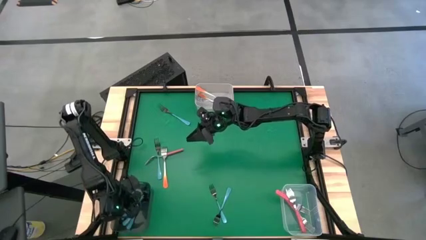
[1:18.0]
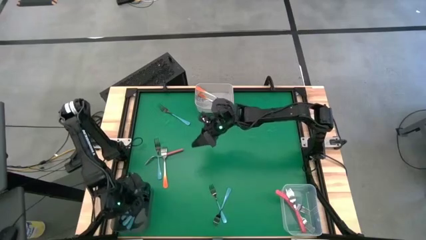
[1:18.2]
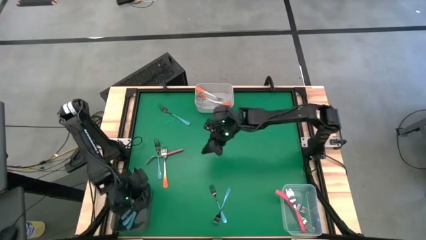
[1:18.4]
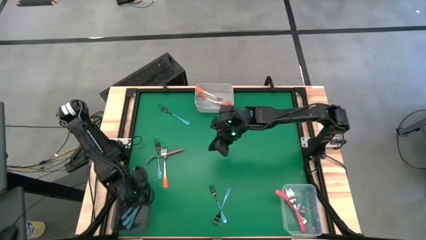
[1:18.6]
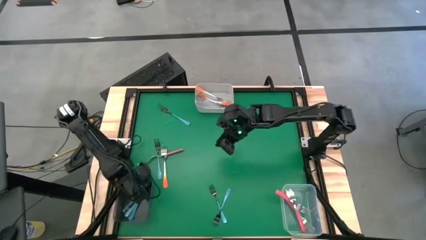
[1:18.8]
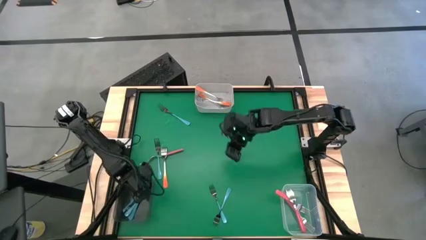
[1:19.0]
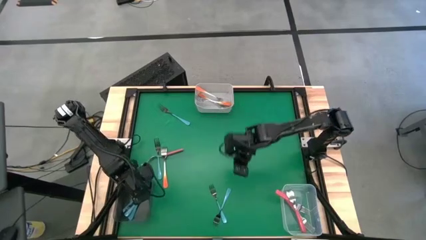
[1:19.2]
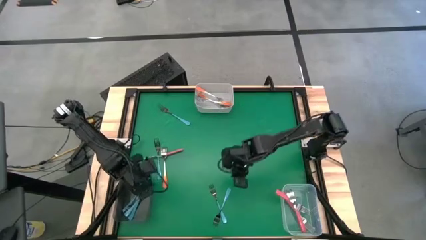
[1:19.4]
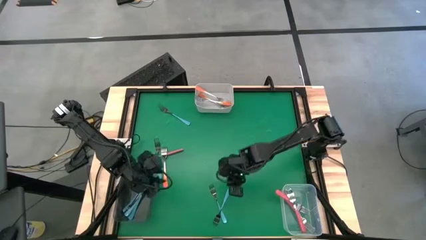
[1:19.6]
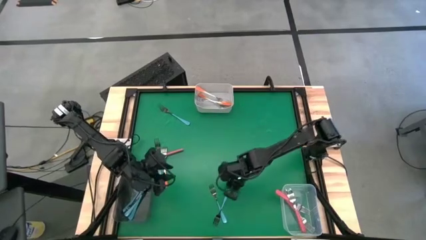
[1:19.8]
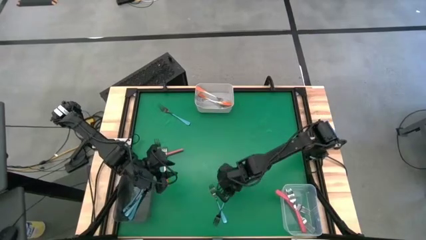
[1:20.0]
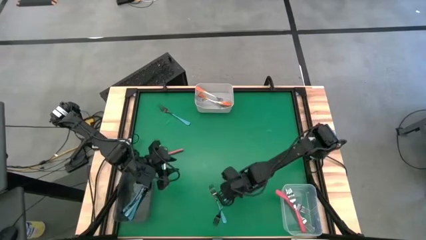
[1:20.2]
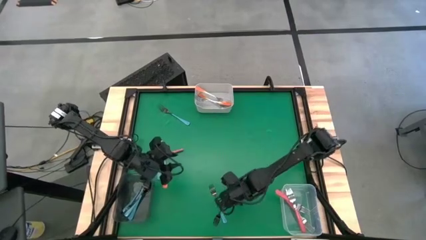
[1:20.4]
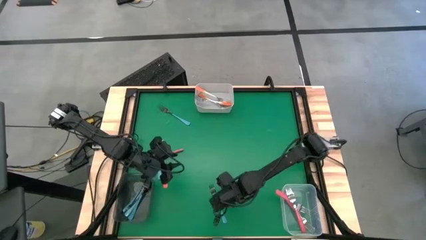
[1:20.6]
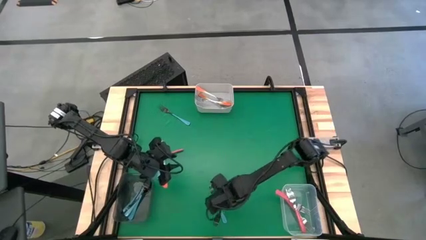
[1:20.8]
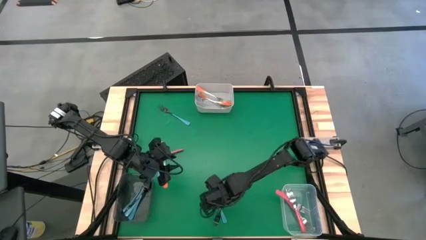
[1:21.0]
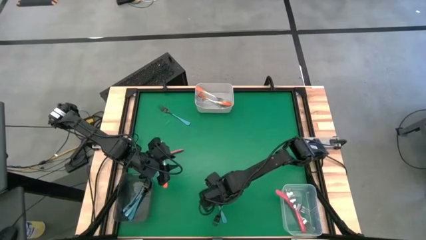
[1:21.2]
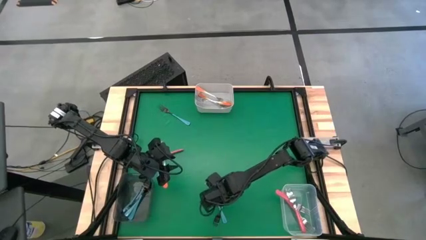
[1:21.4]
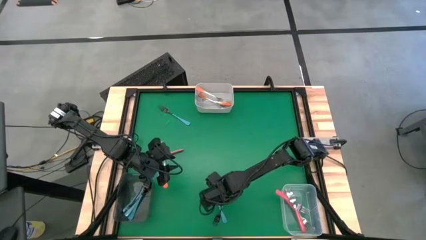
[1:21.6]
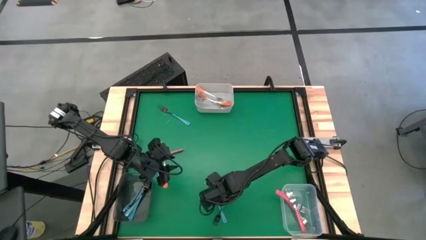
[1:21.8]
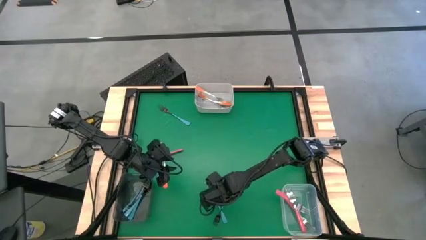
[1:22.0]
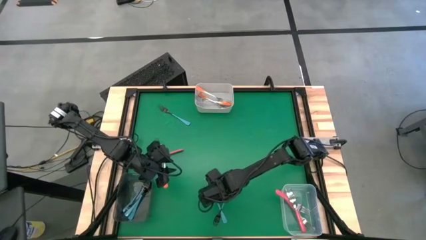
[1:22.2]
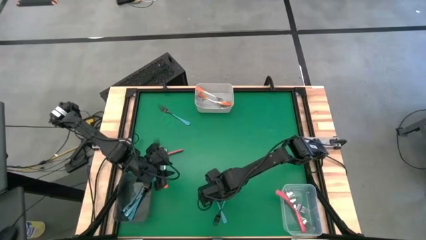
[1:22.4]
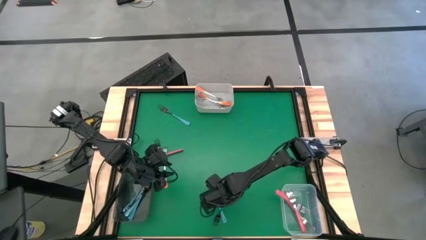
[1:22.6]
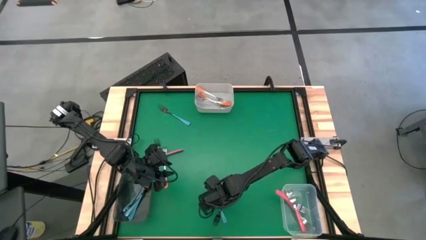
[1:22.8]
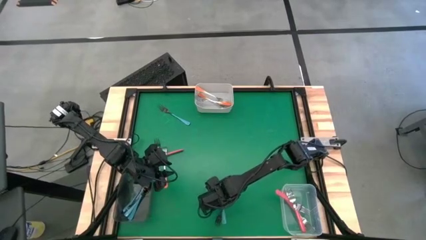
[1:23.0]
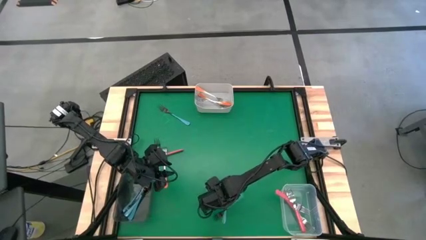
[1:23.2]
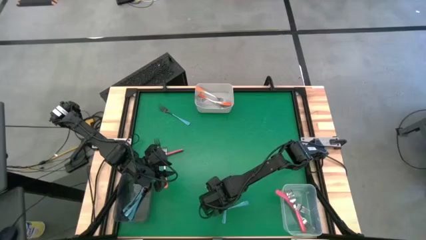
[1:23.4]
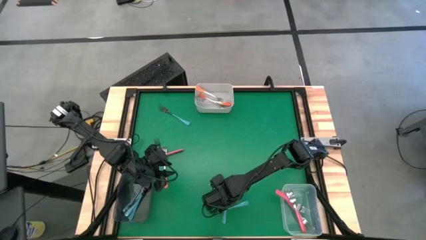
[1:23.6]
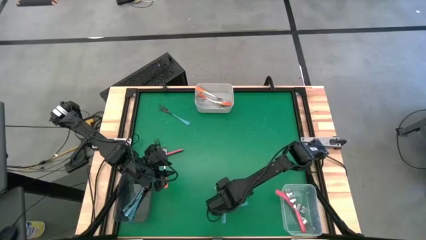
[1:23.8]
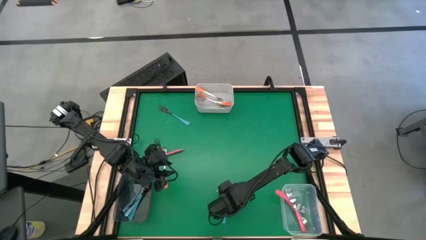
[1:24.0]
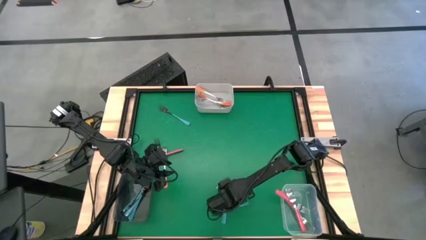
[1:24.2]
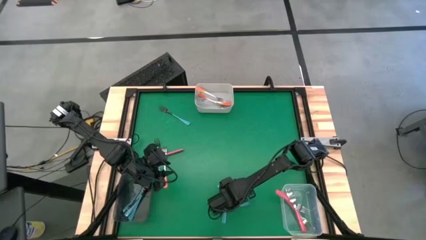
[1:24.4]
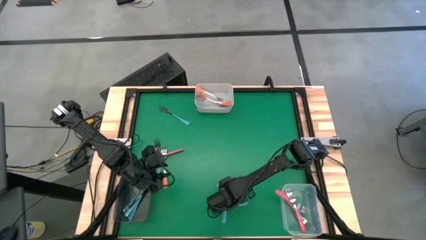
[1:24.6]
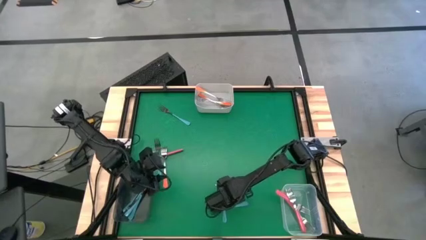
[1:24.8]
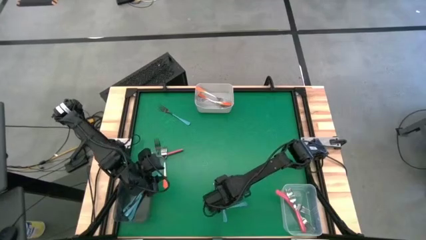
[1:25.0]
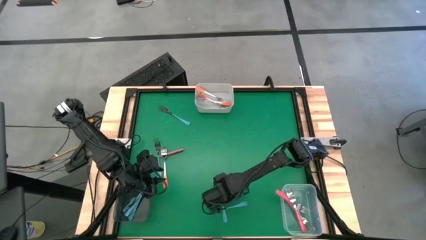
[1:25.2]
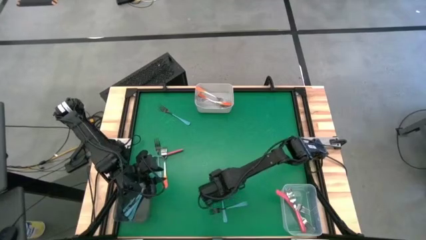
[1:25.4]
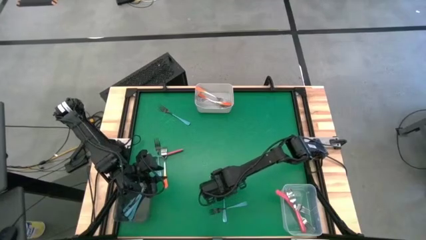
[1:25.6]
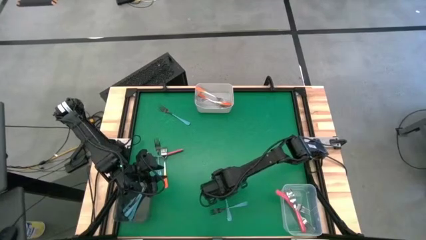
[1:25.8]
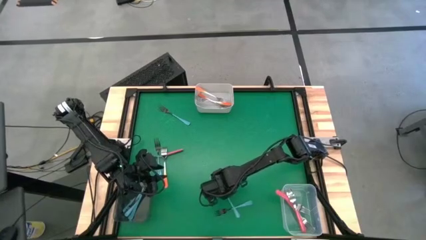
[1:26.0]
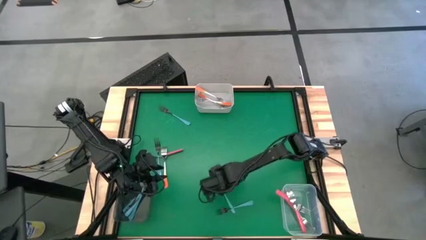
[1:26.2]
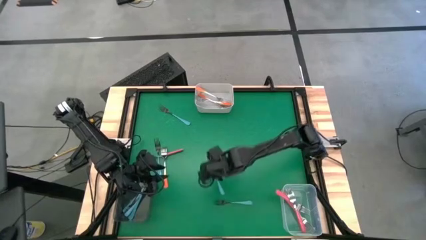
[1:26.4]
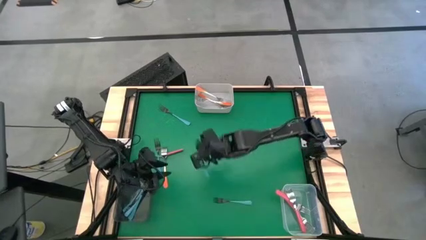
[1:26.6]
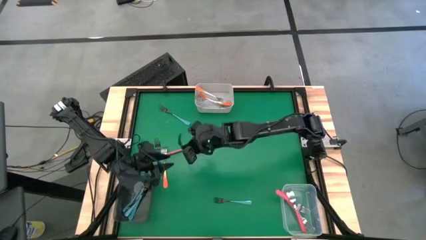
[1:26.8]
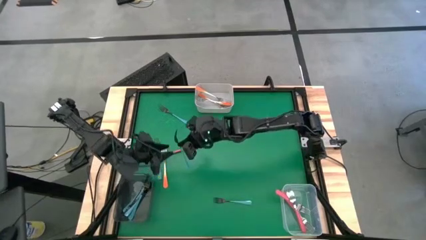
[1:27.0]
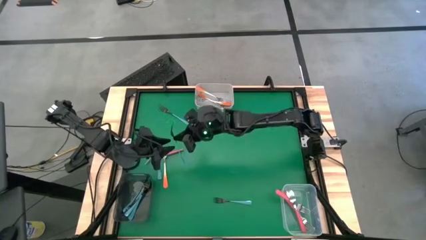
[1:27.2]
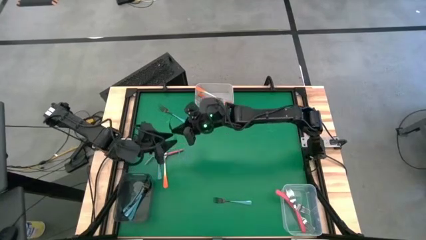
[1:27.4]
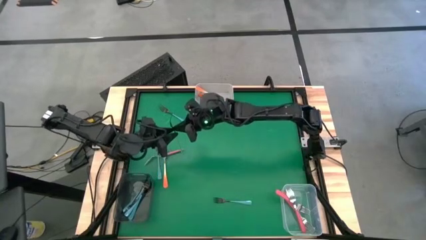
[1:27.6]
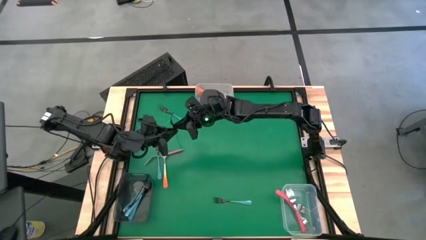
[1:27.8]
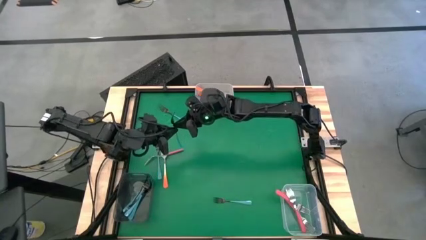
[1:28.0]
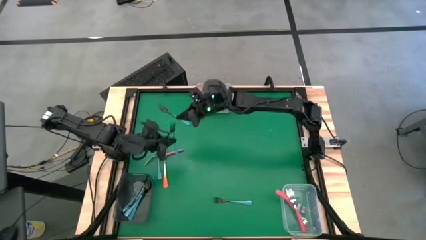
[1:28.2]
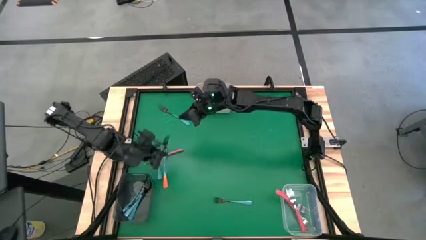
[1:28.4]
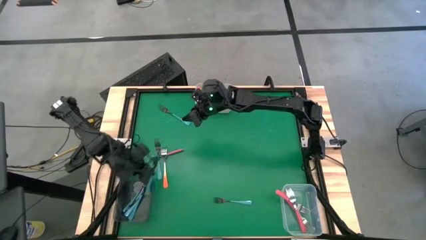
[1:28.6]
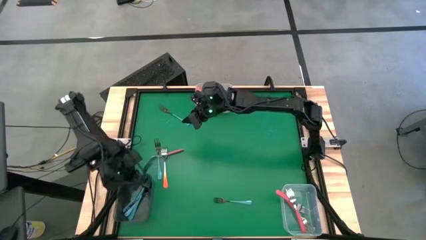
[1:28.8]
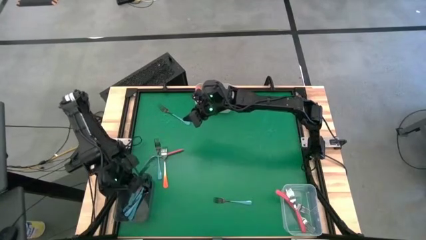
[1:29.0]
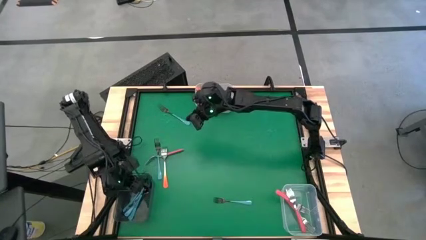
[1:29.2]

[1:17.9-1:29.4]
Task: Sort silverware by color (type)
Put the blue fork into the black transparent bin
